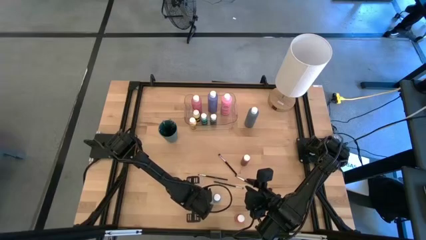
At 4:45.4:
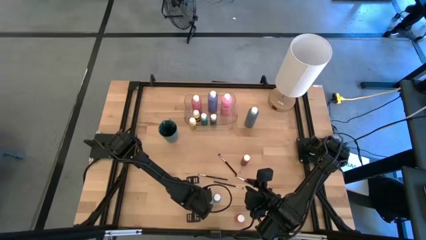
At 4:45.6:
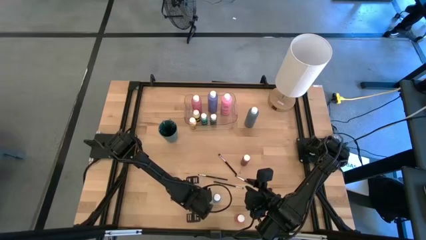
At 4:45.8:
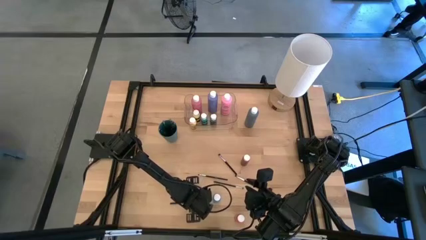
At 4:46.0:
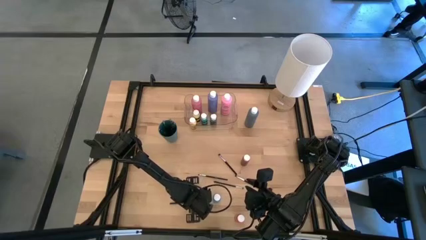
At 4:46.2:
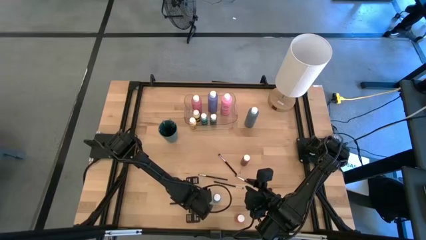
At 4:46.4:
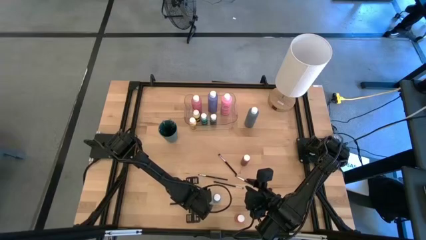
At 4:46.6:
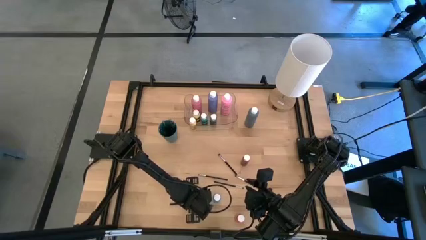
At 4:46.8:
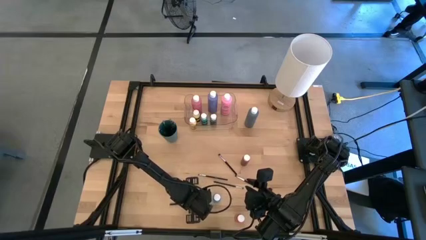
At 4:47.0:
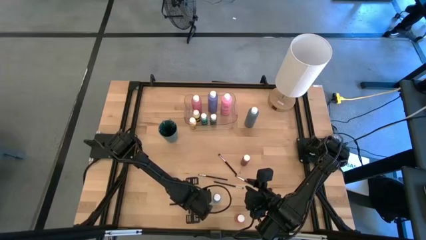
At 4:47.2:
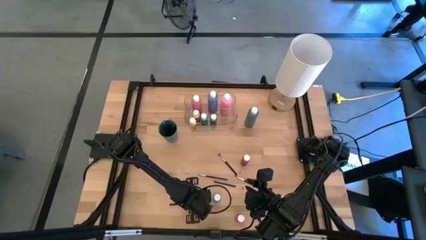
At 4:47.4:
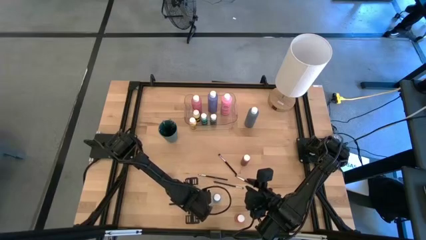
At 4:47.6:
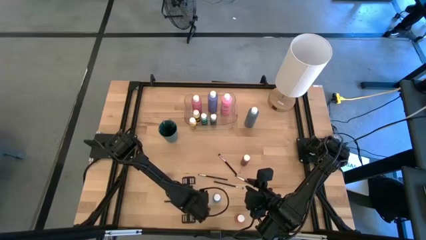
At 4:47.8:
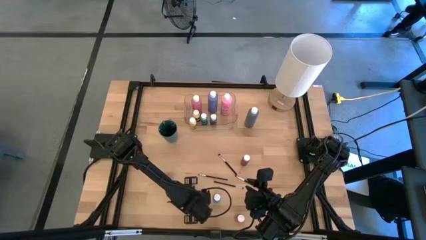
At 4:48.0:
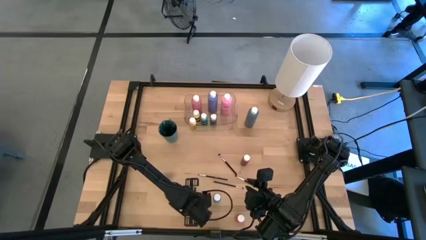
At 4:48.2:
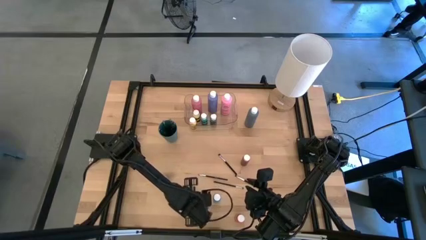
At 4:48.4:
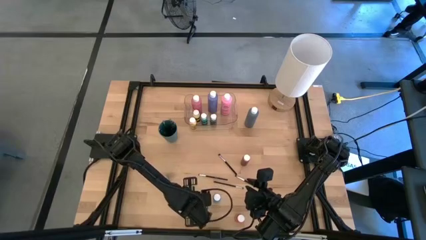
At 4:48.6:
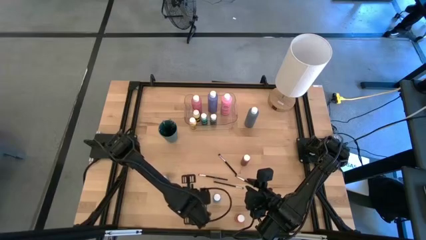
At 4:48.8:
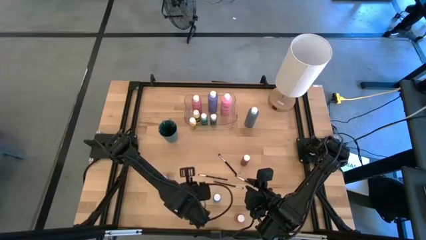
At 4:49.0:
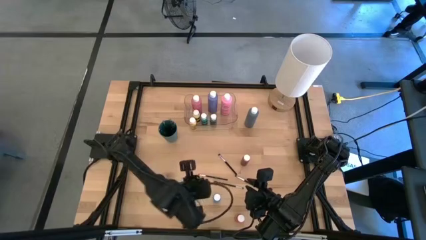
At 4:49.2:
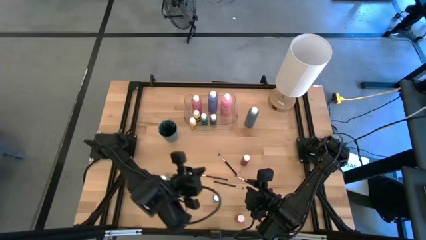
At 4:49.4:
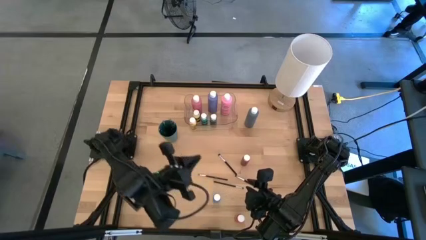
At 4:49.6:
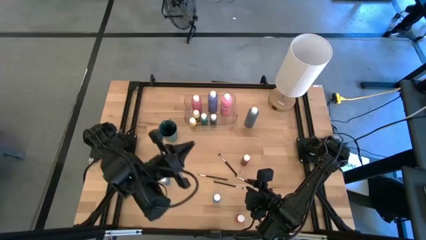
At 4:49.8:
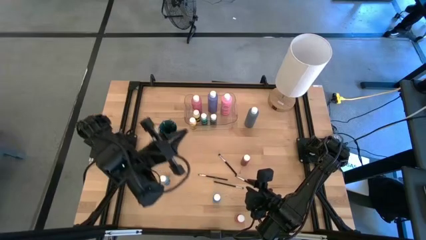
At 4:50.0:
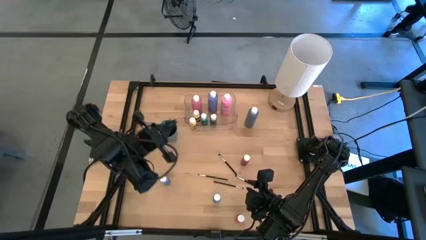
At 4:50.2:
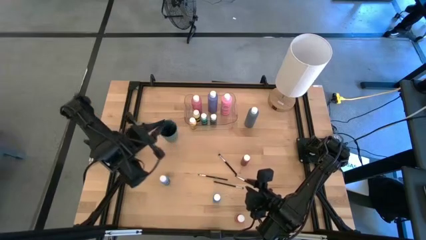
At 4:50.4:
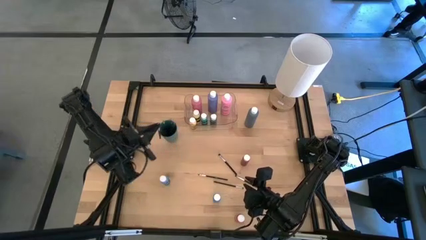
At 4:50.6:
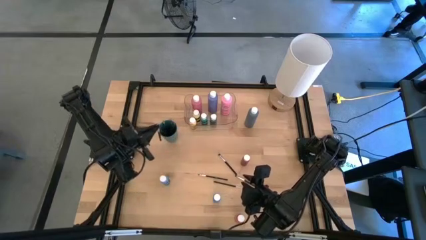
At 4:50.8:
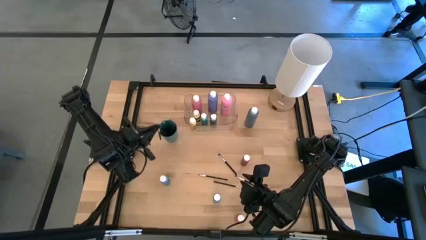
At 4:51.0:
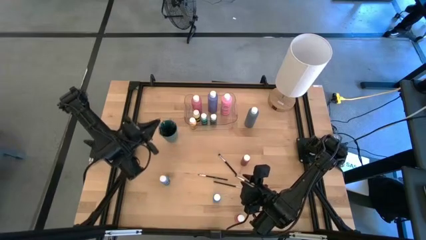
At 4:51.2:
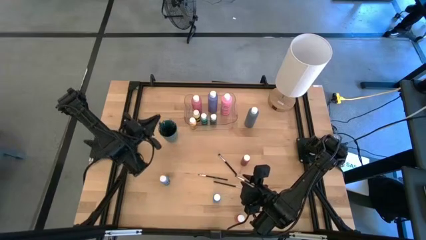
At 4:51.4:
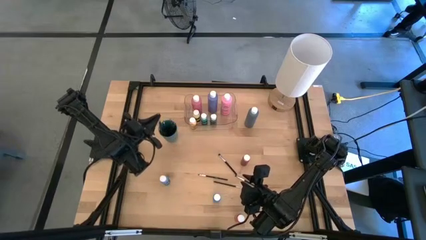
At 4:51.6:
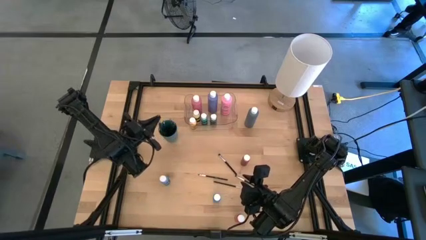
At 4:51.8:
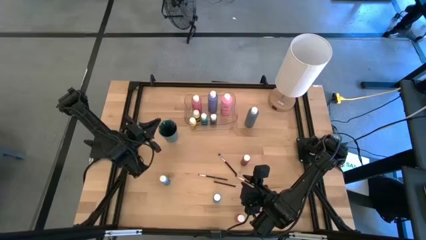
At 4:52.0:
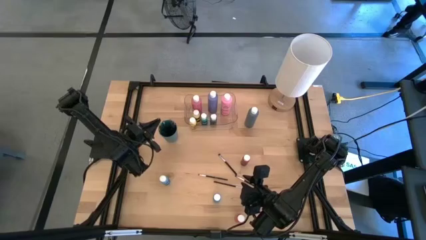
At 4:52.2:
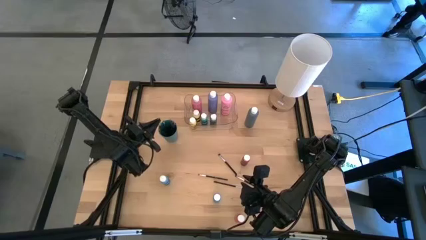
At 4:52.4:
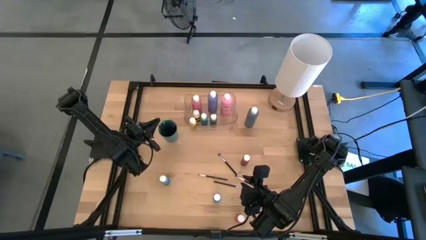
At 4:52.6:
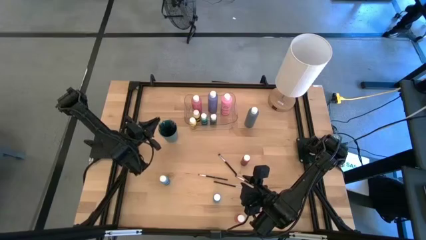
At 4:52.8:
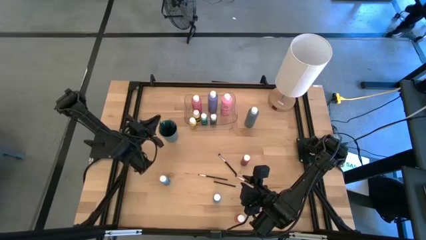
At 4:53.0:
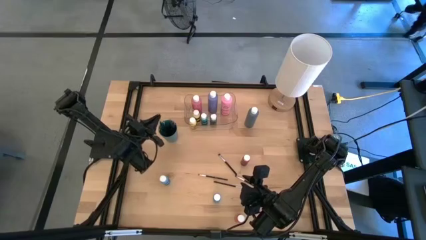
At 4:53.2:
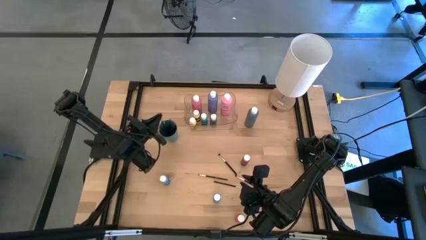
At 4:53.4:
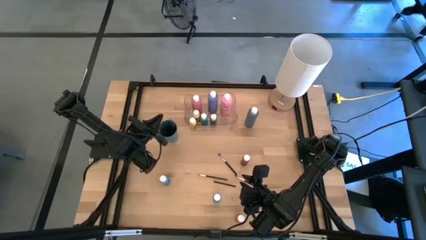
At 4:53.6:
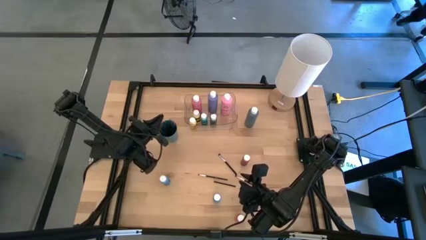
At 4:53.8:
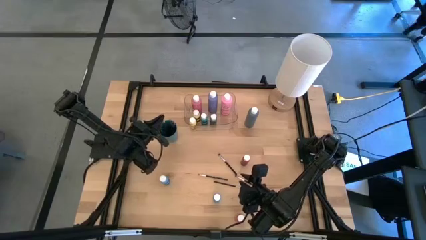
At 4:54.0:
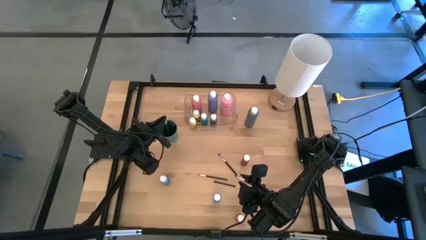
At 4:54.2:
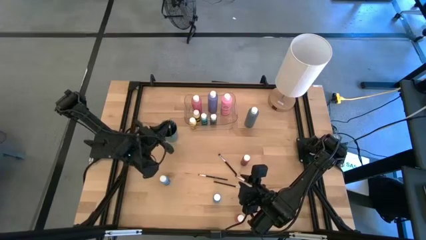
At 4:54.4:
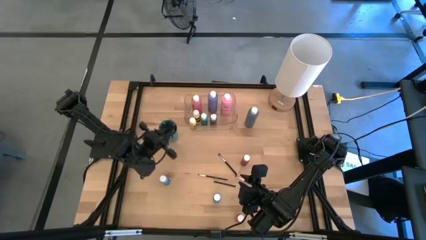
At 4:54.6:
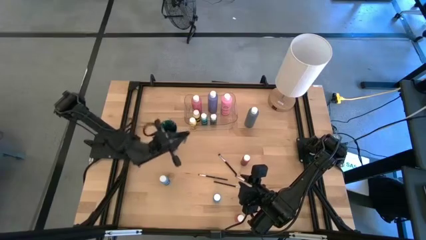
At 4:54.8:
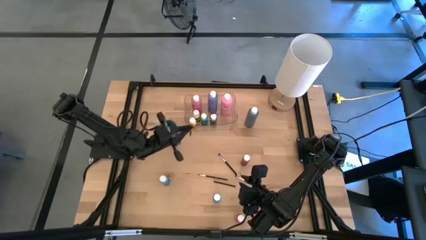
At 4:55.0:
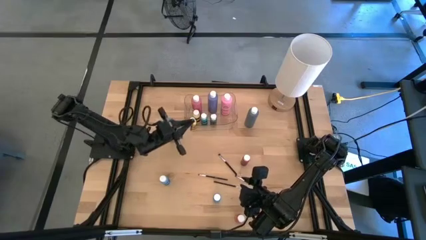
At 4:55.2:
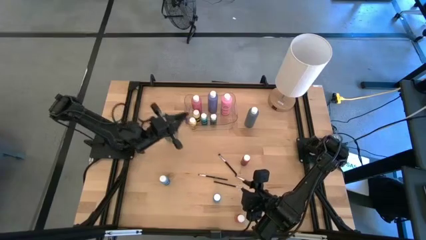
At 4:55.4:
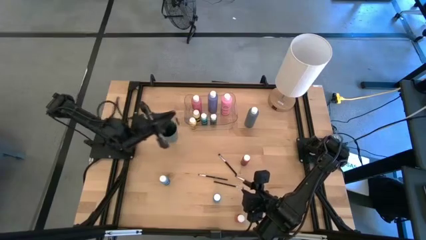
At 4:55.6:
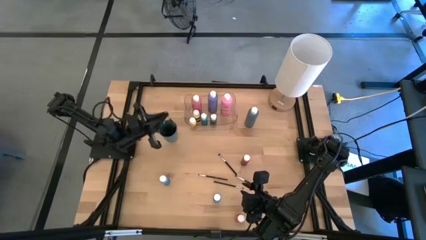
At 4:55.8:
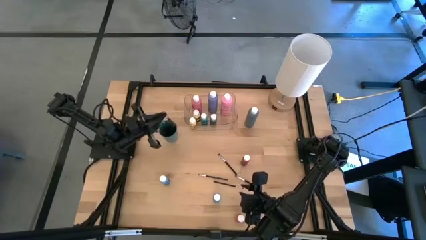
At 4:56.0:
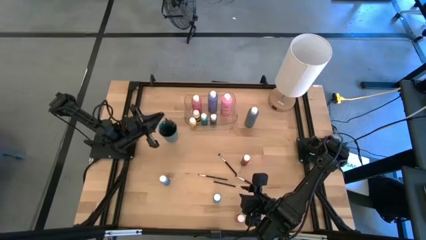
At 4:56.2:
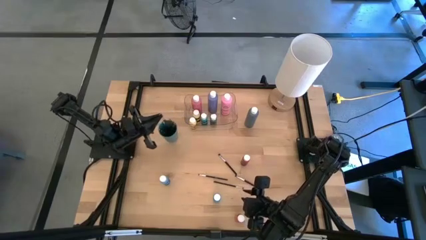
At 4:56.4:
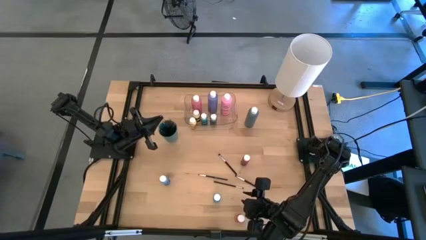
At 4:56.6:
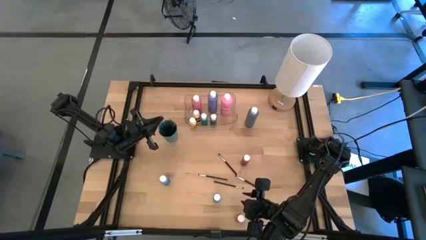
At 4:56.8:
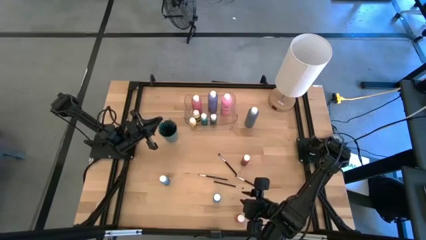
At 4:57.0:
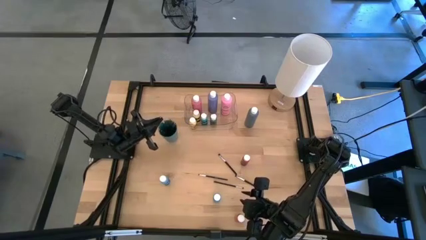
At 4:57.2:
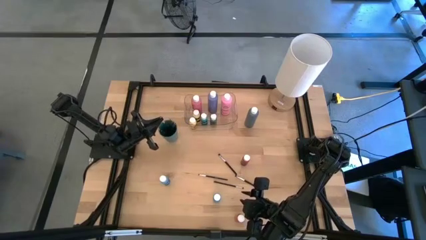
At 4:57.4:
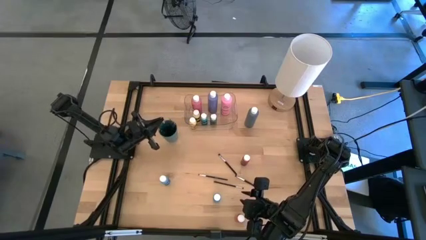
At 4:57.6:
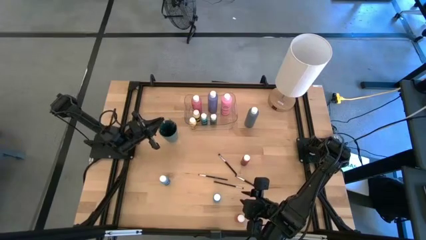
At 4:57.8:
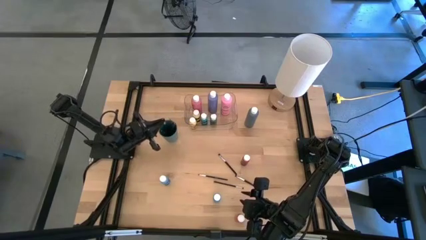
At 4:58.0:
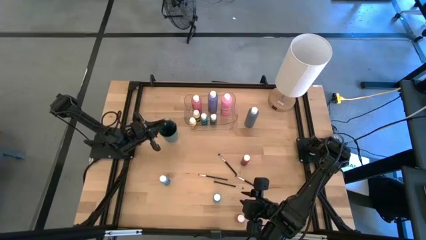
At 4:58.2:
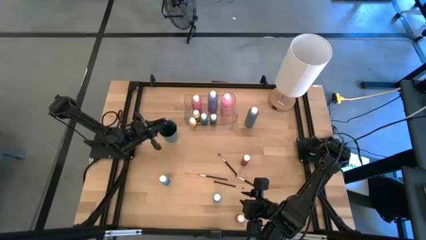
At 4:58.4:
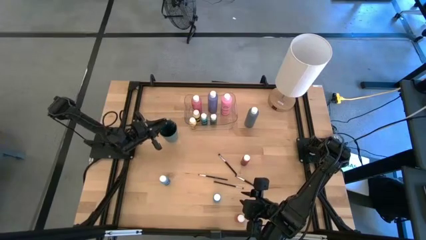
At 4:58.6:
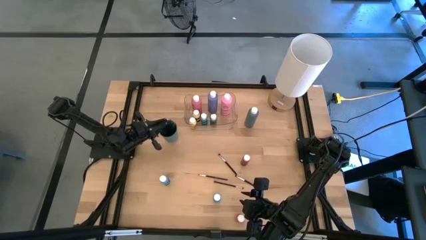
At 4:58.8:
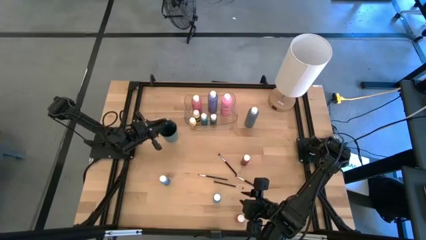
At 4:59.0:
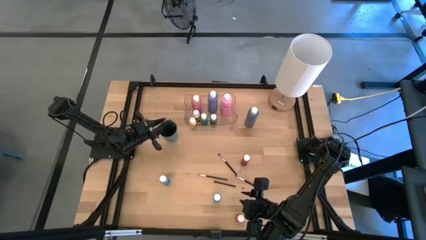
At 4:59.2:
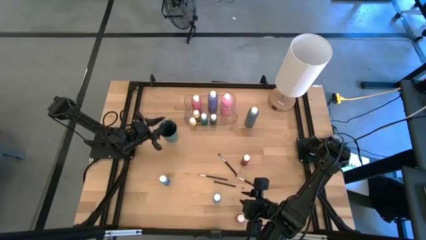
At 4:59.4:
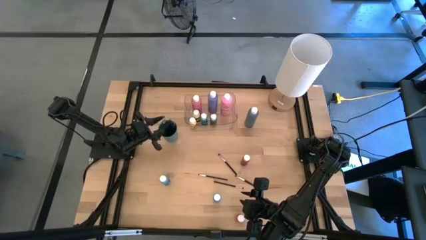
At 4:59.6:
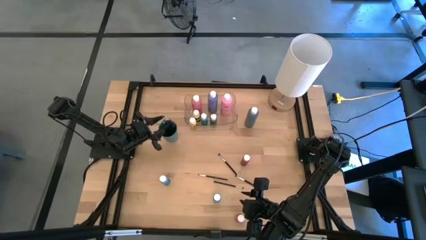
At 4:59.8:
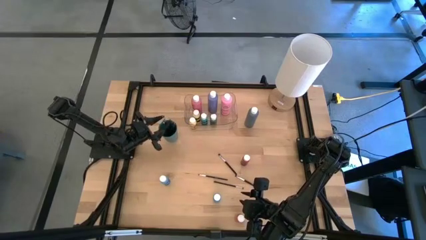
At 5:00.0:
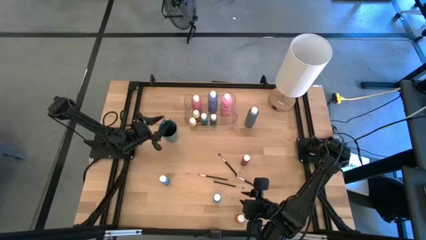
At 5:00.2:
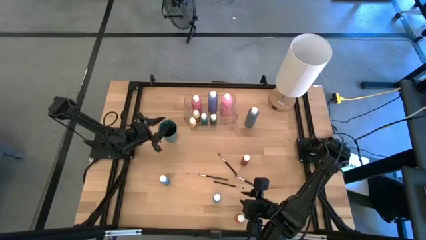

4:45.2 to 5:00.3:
Task: Pick & Place Paint Supplies
Put the black paint brush into the green cup

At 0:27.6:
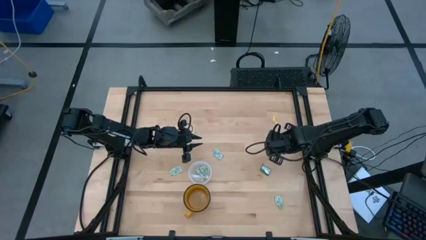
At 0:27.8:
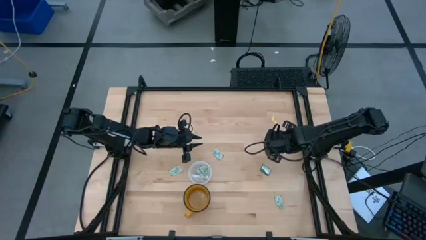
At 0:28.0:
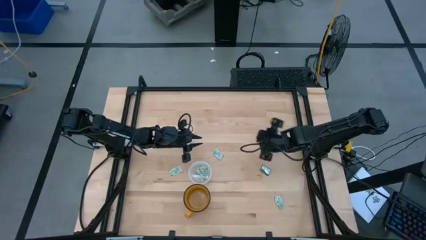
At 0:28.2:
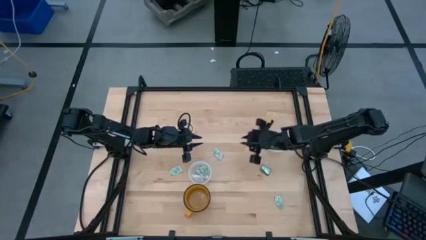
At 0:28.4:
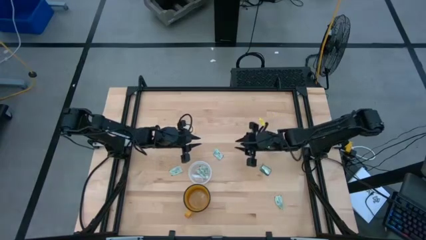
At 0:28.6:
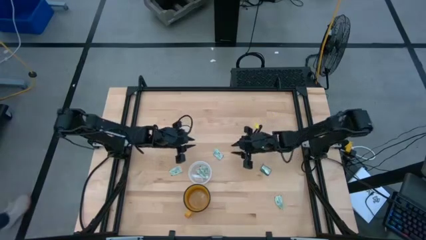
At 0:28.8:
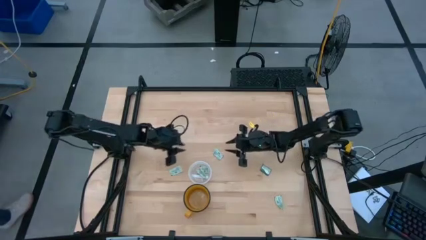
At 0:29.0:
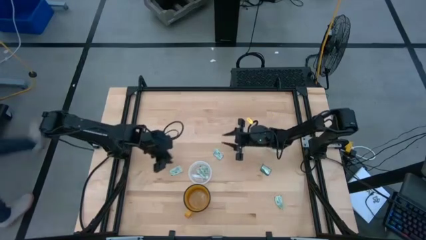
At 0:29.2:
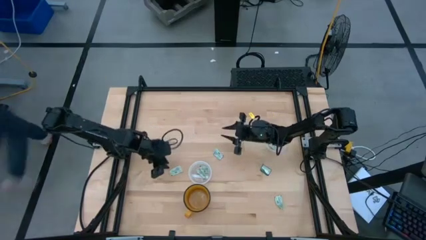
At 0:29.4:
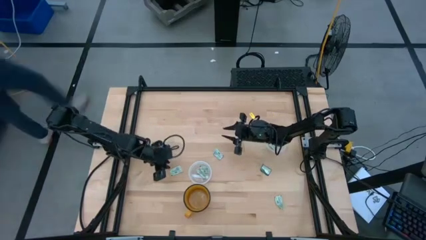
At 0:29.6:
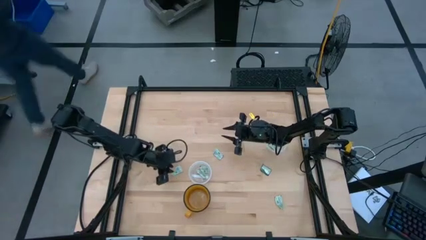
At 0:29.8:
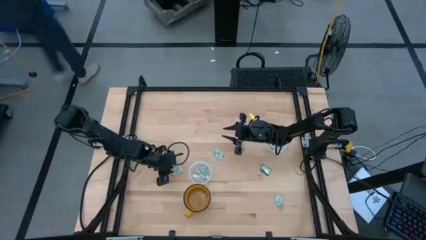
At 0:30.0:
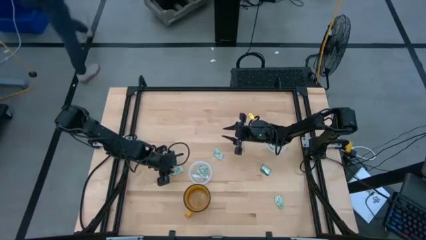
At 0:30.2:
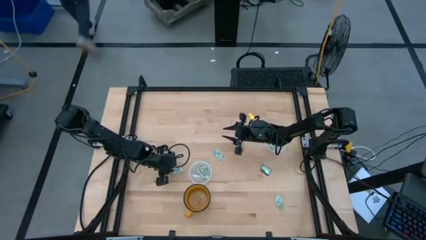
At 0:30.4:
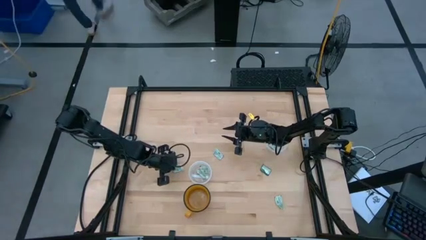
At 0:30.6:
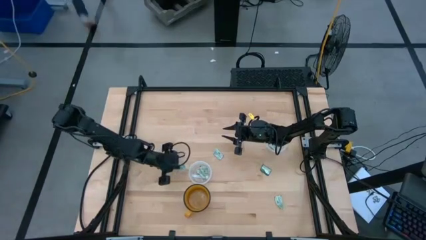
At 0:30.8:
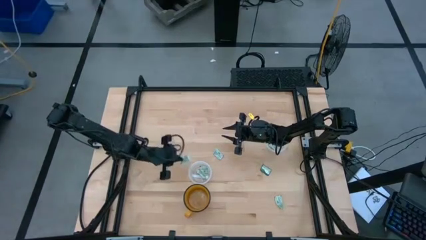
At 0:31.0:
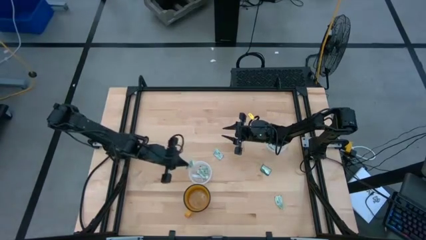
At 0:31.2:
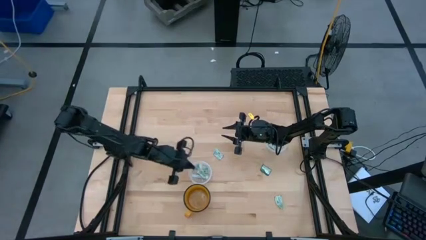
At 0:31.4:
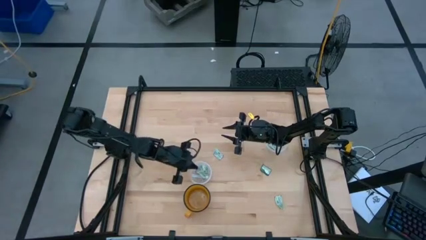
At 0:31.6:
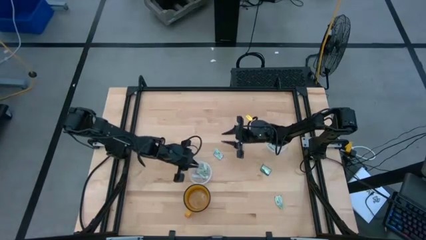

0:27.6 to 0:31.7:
Task: Pick and place items into bin
Put the stevia packet into the left transparent bin
